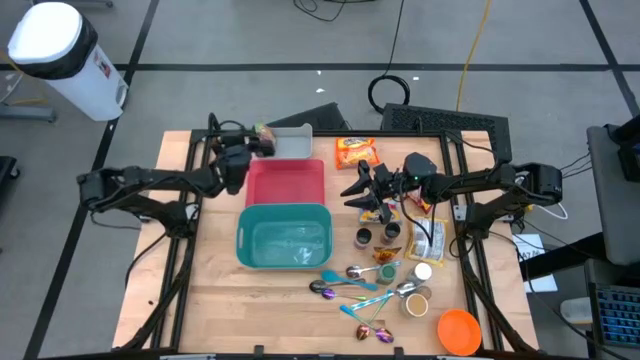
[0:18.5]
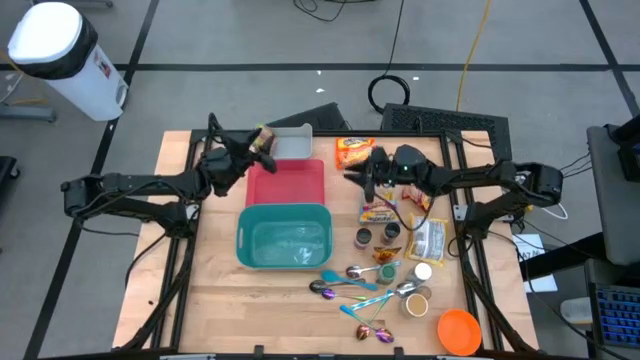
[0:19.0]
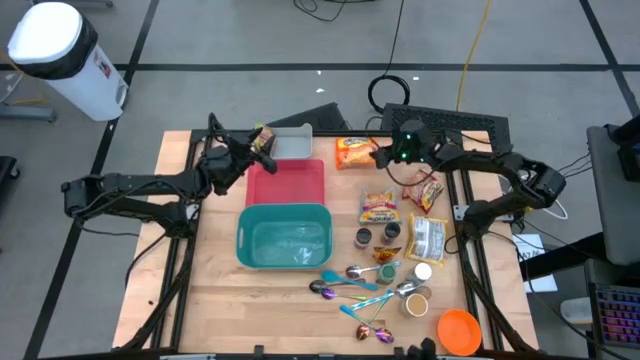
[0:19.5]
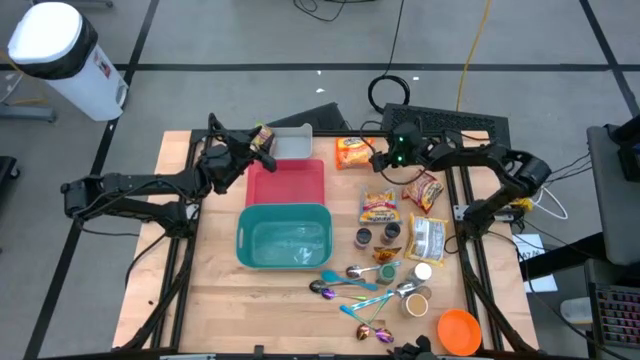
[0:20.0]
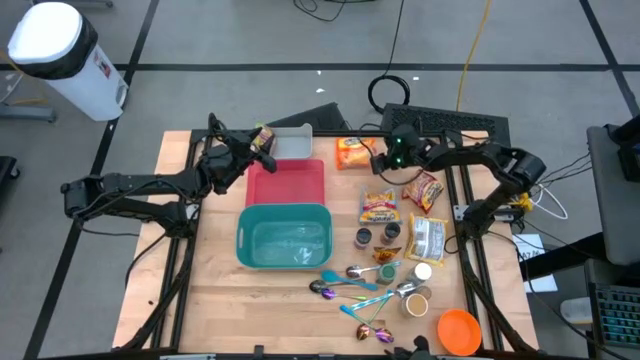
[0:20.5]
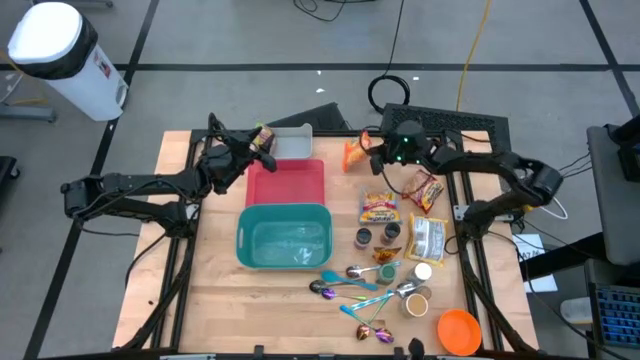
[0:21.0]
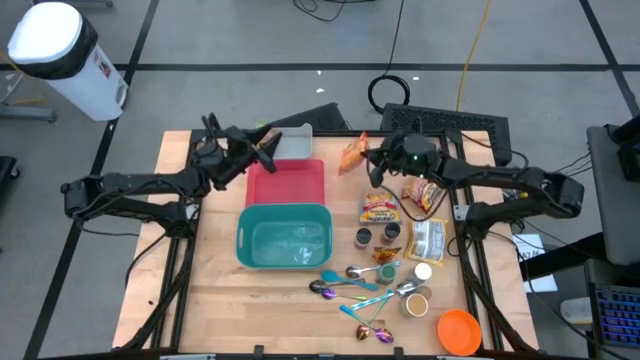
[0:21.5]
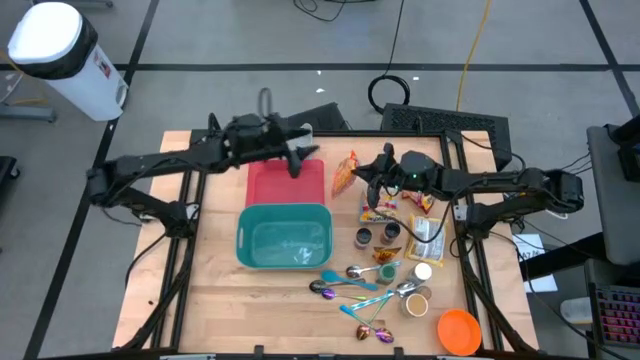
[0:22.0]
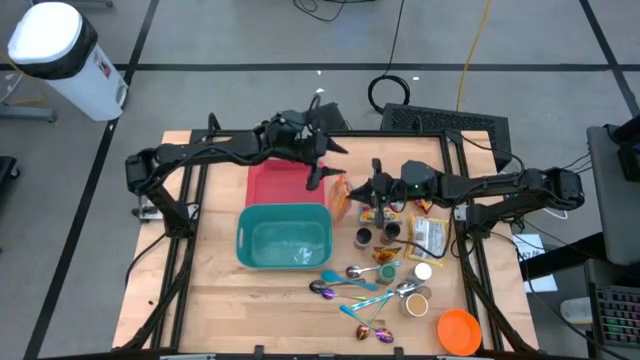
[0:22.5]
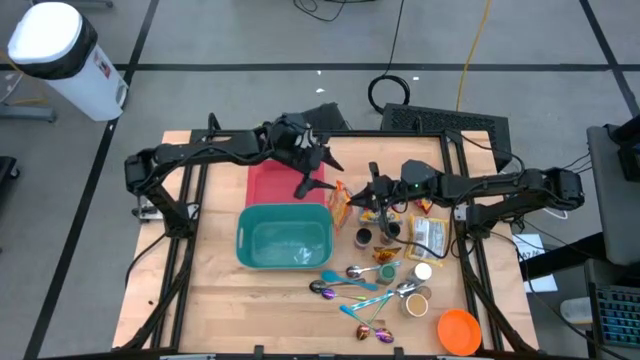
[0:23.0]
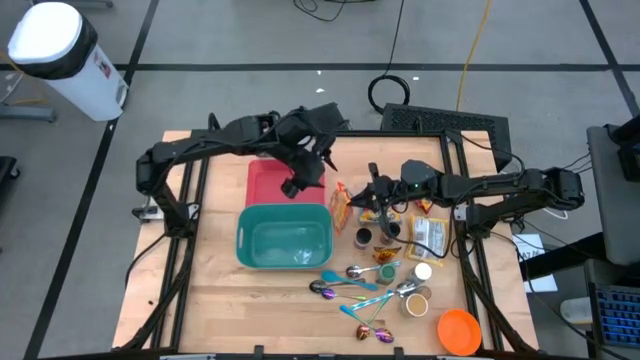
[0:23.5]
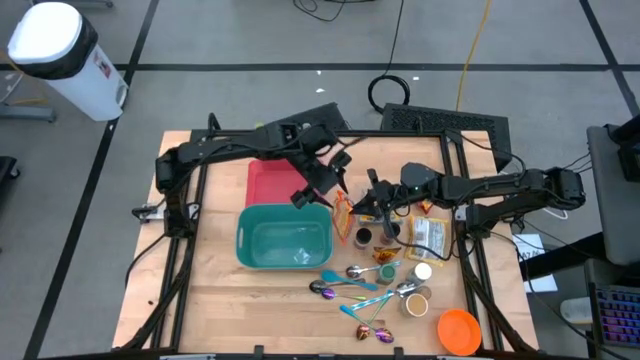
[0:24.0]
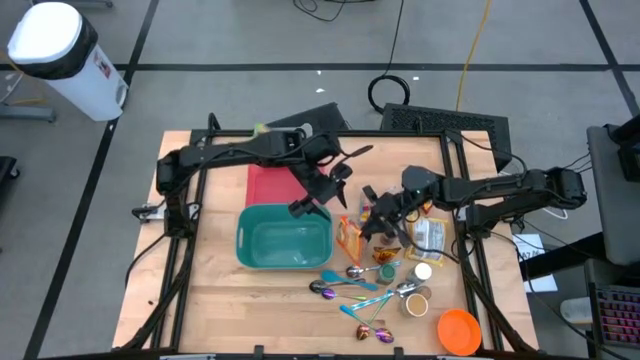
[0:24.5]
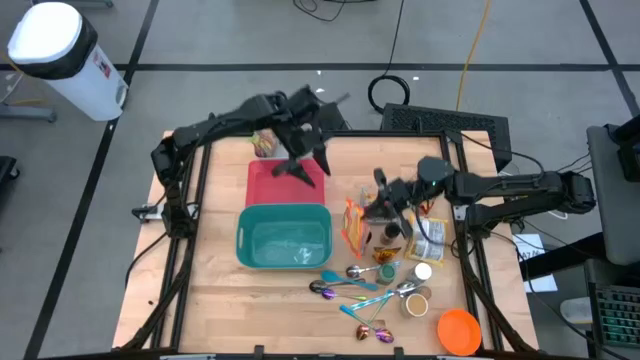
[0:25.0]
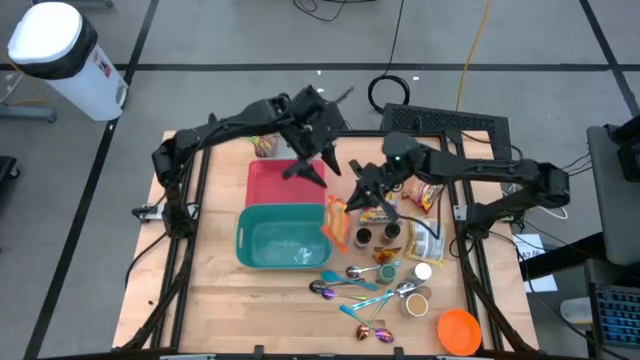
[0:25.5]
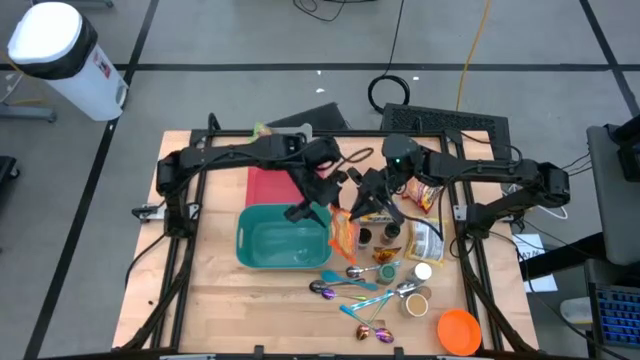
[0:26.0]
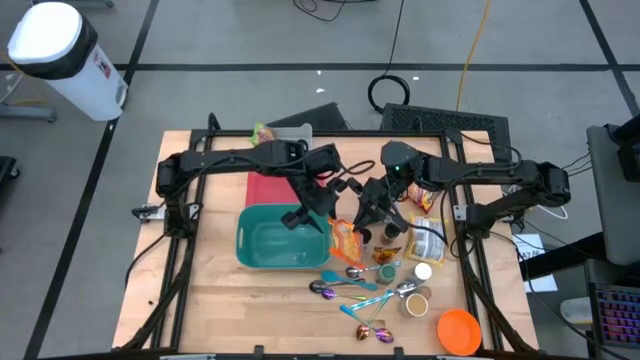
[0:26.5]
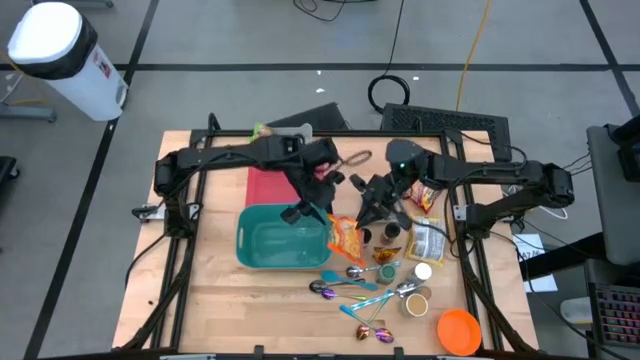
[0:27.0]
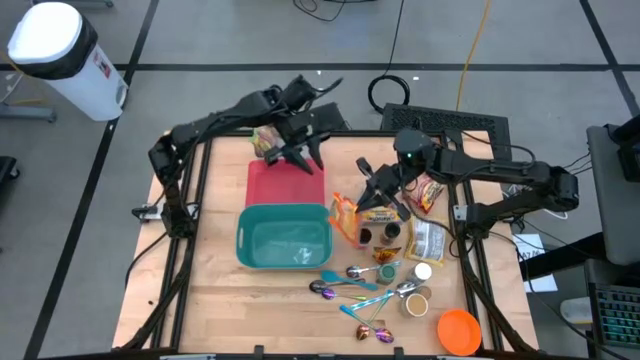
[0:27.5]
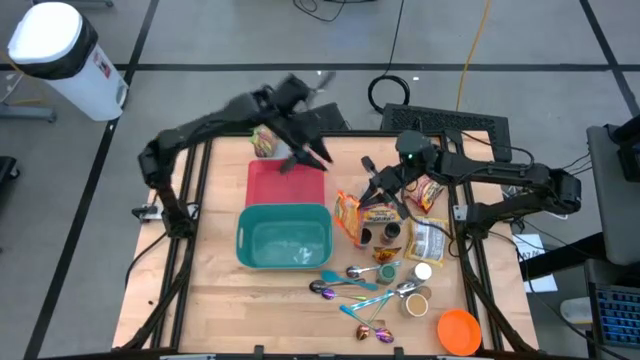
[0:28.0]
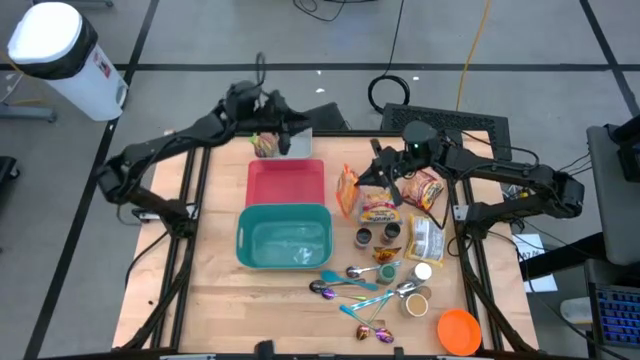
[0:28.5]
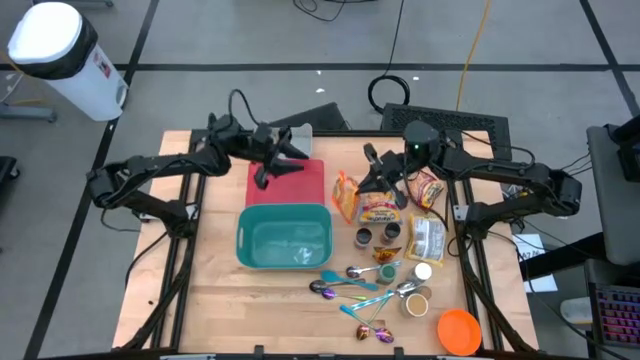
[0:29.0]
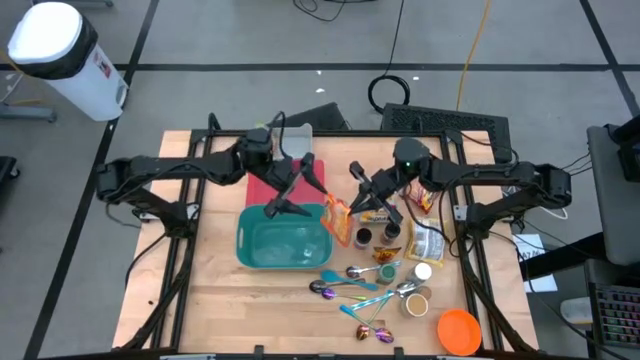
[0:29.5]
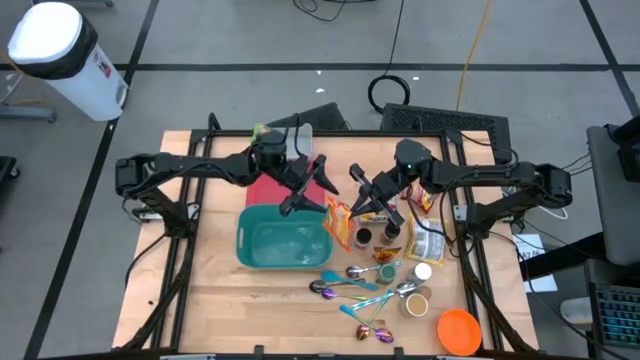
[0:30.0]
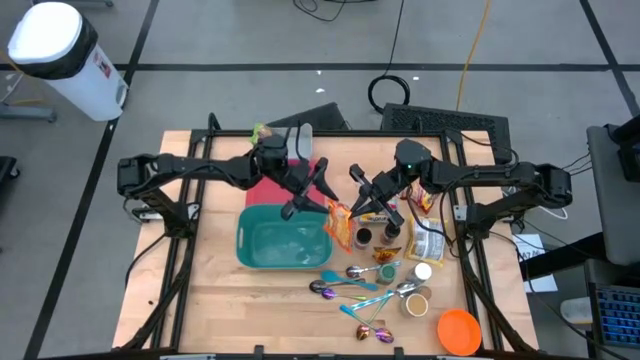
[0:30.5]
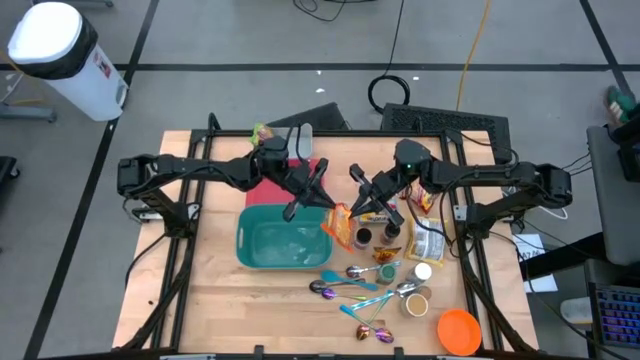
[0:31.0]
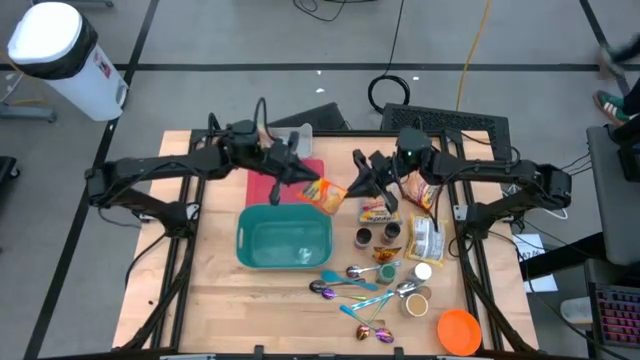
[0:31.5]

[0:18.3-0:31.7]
Task: Pick & Place Food Item
Put the orange noodle pack into the gray bin

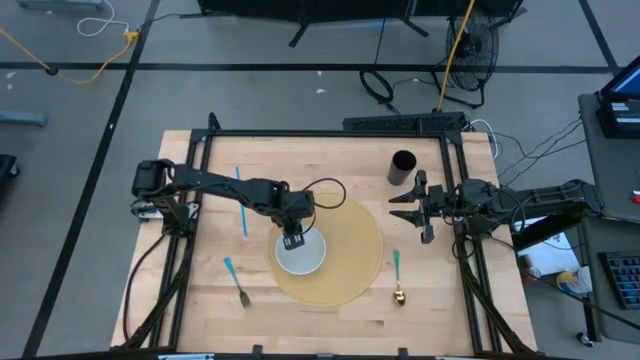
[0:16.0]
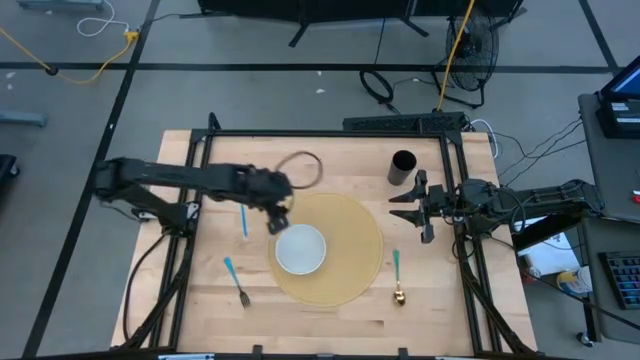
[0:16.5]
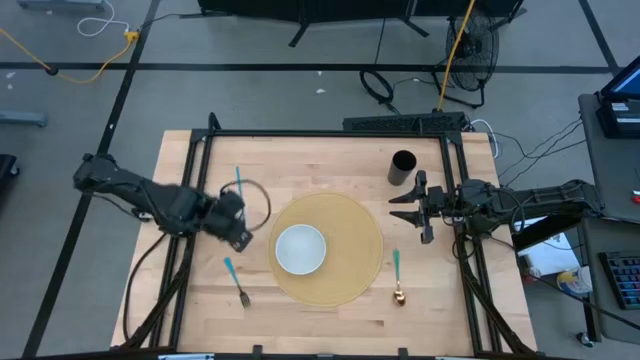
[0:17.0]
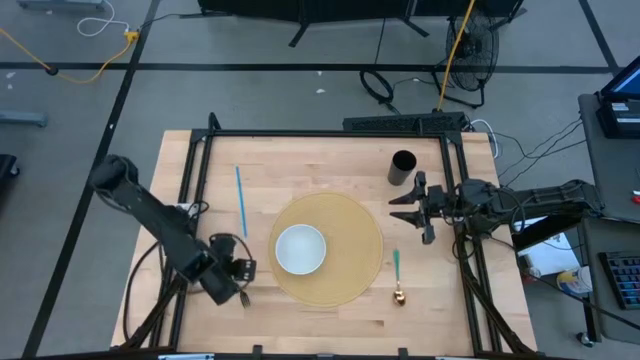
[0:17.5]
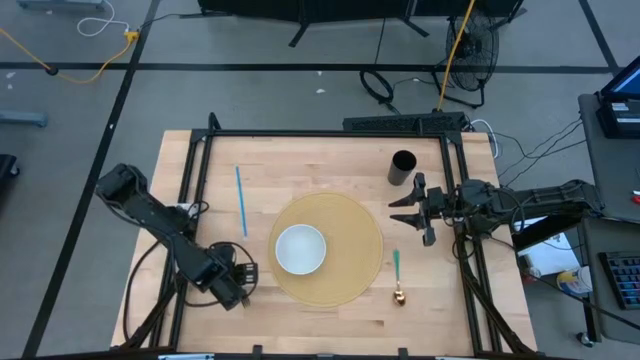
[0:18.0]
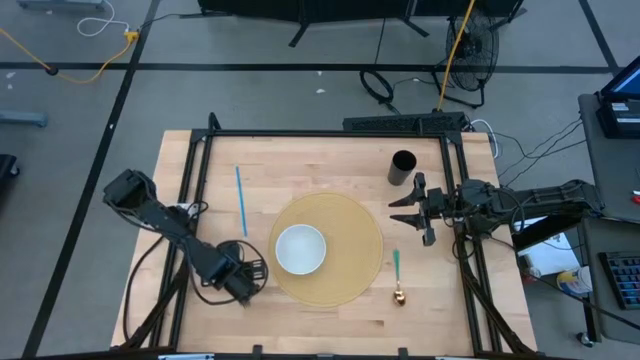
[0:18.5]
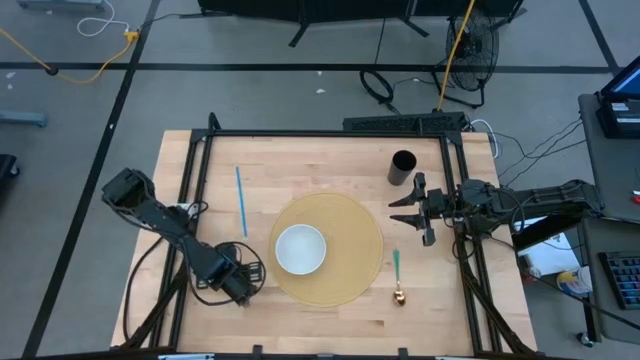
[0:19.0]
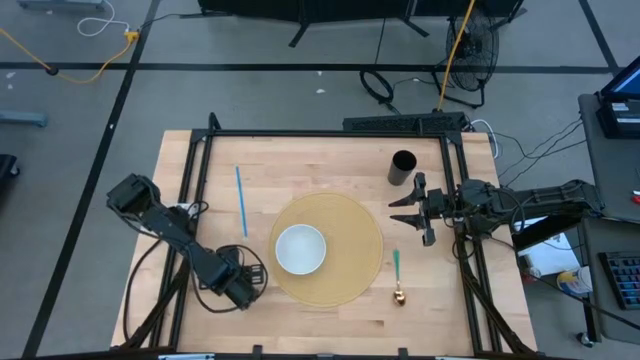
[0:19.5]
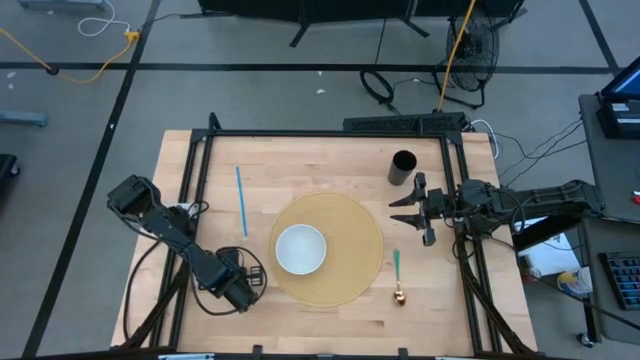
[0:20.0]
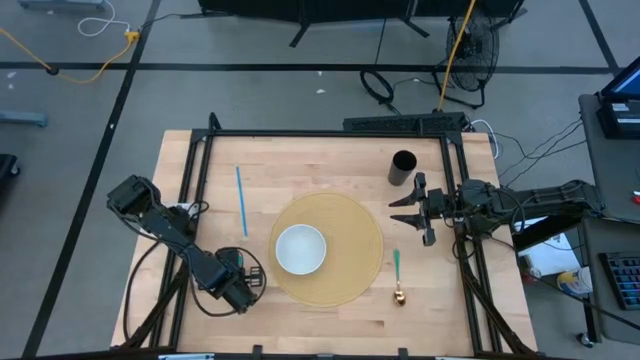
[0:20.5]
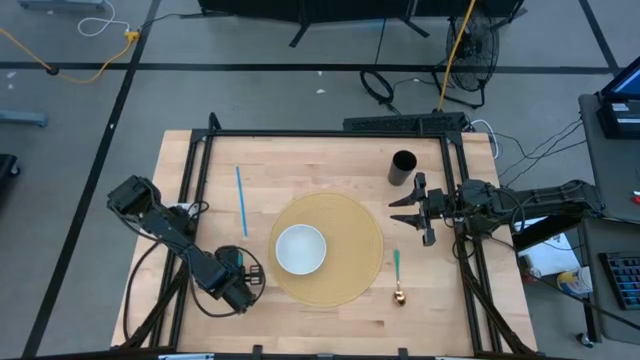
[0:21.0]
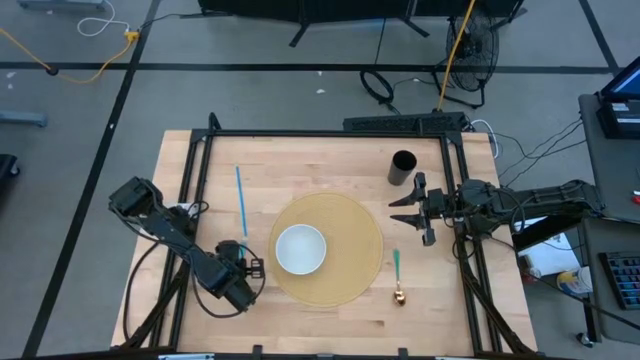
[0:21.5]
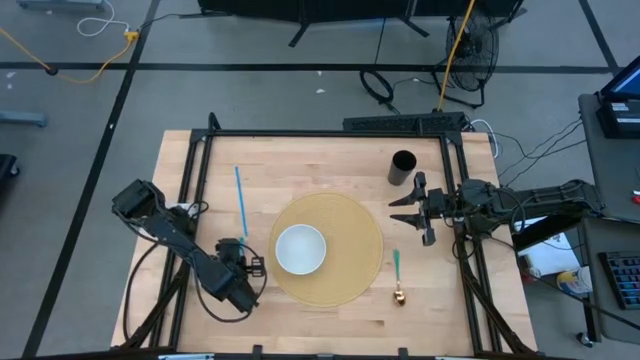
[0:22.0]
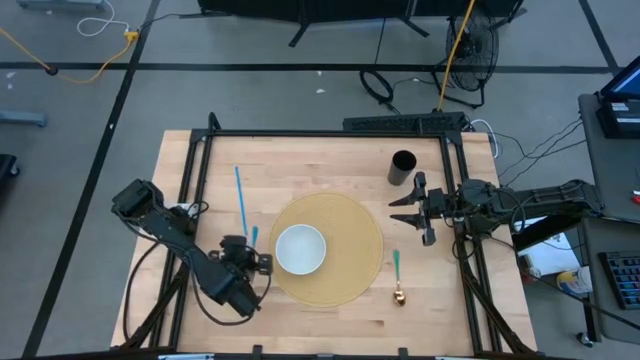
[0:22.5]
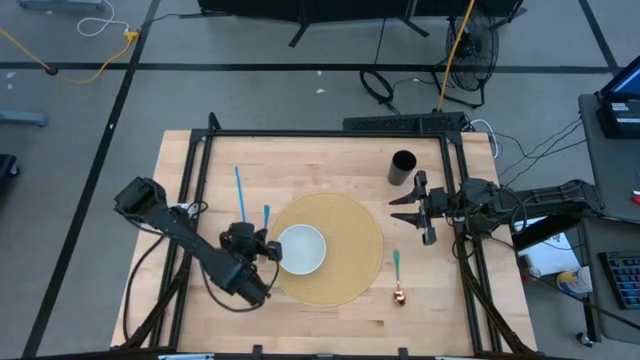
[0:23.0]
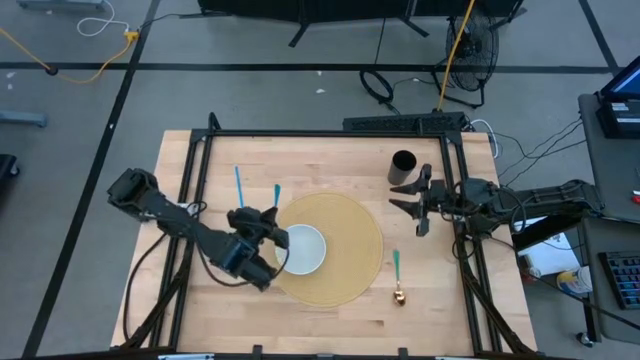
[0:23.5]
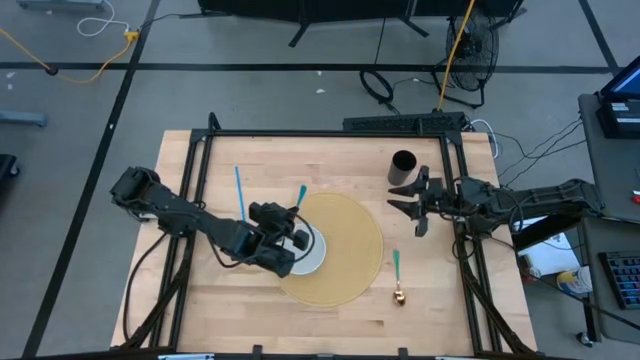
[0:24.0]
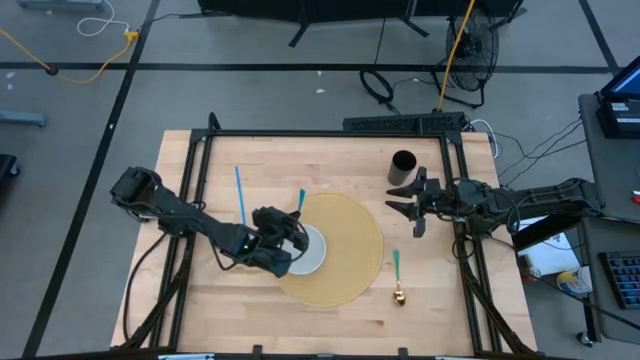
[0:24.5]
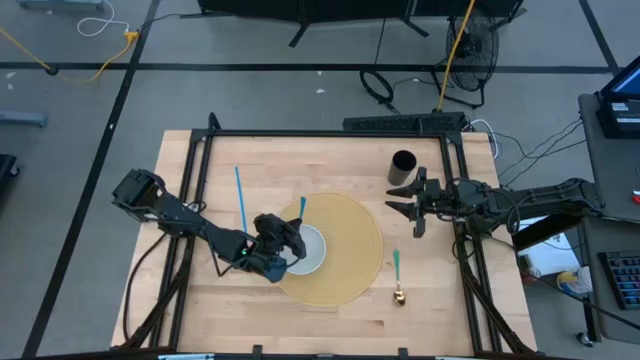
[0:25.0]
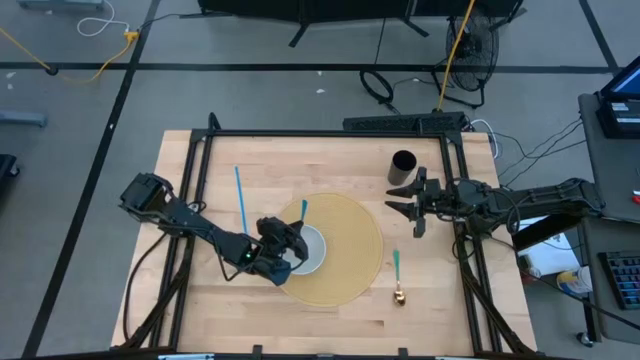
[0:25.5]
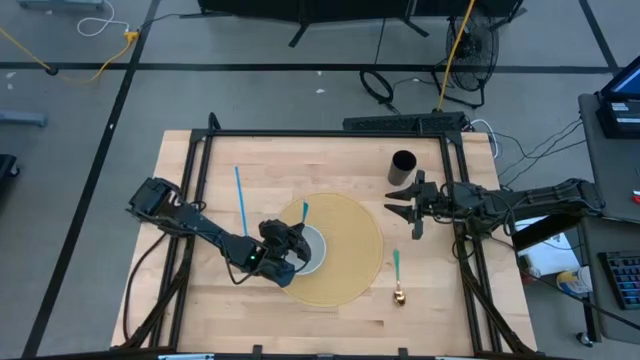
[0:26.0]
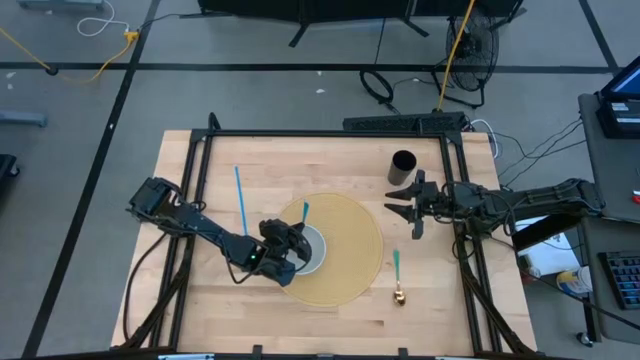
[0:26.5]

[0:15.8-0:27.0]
Task: Pick & Place Utensil
Put the blue fork into the white bowl on the brown mat
